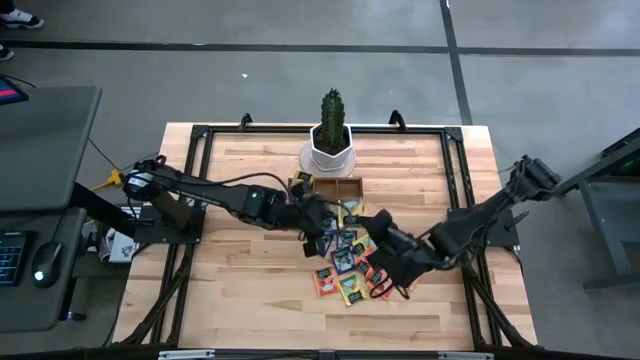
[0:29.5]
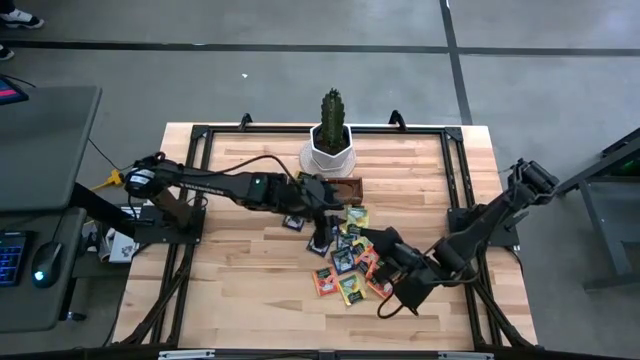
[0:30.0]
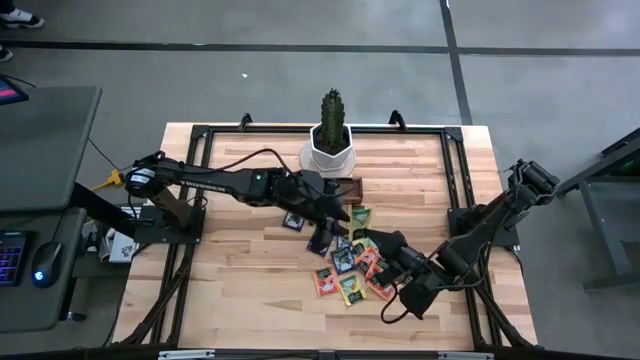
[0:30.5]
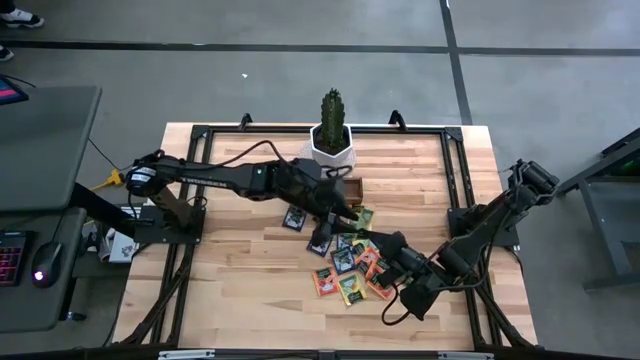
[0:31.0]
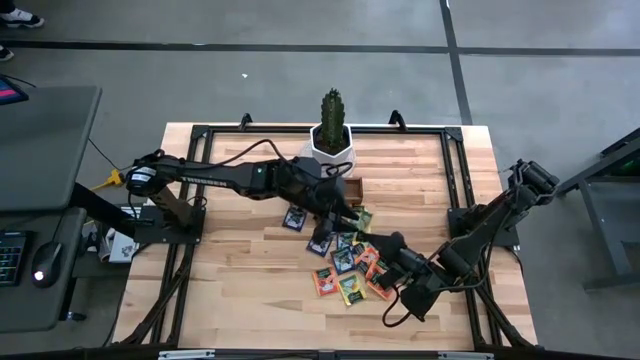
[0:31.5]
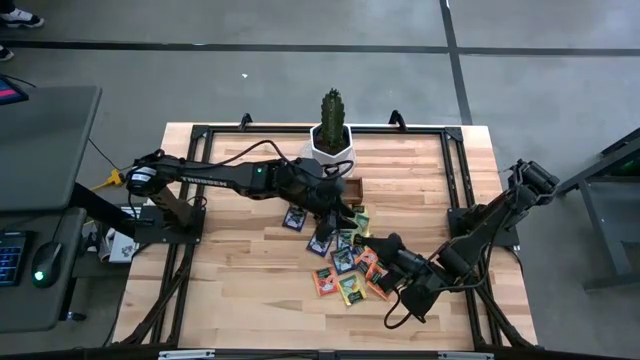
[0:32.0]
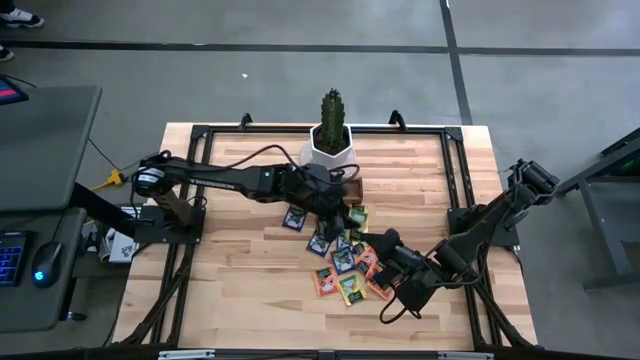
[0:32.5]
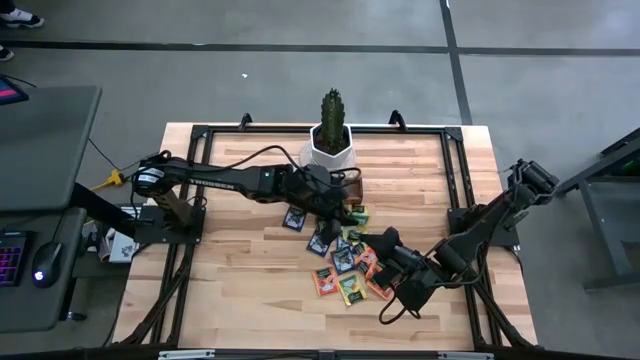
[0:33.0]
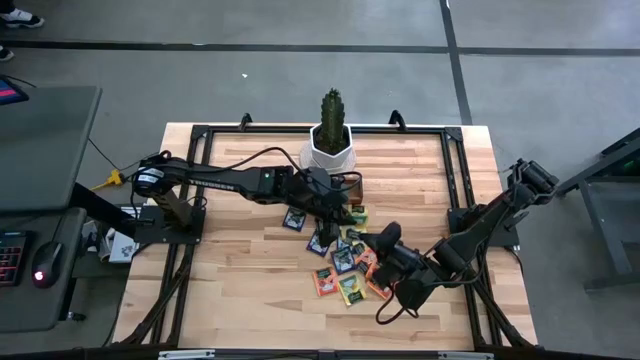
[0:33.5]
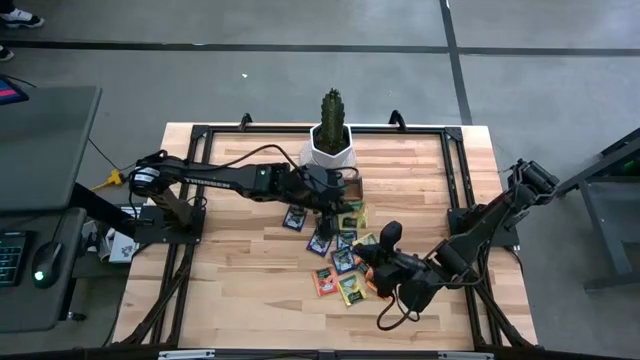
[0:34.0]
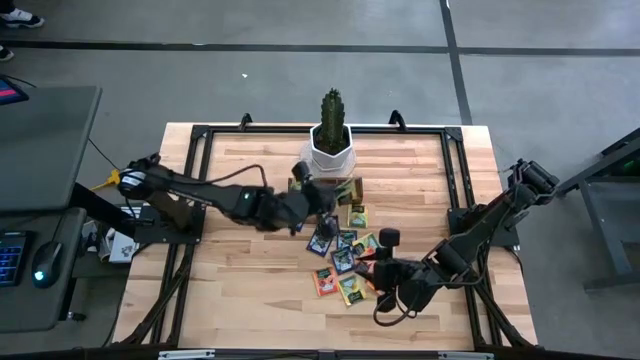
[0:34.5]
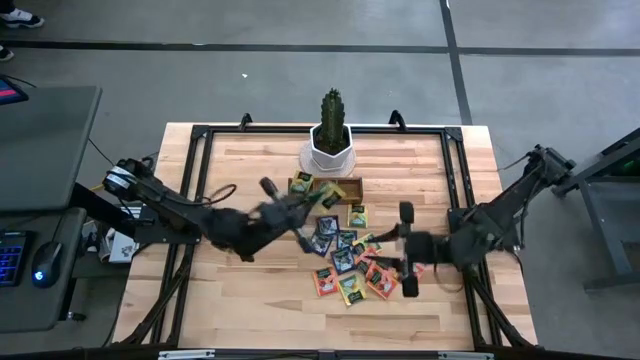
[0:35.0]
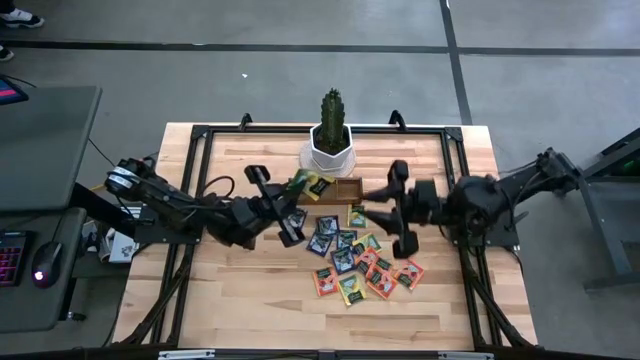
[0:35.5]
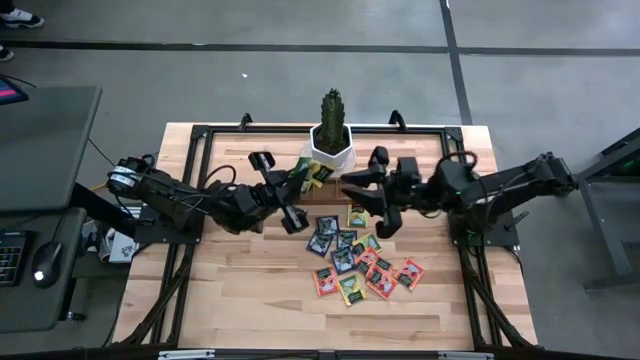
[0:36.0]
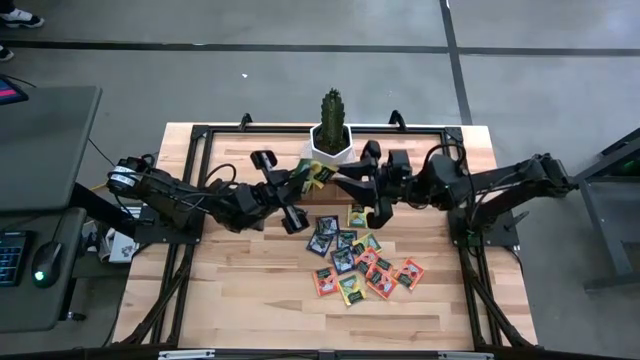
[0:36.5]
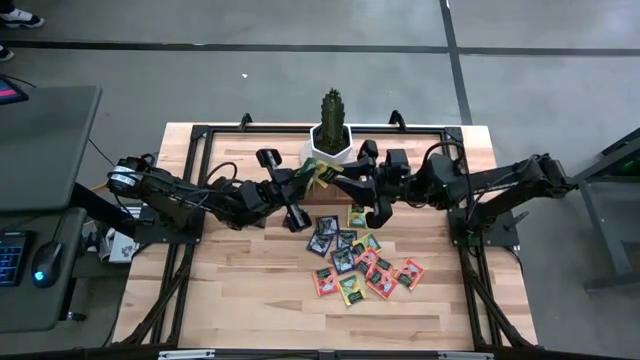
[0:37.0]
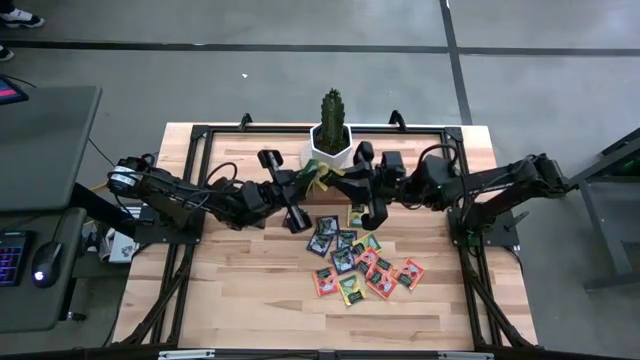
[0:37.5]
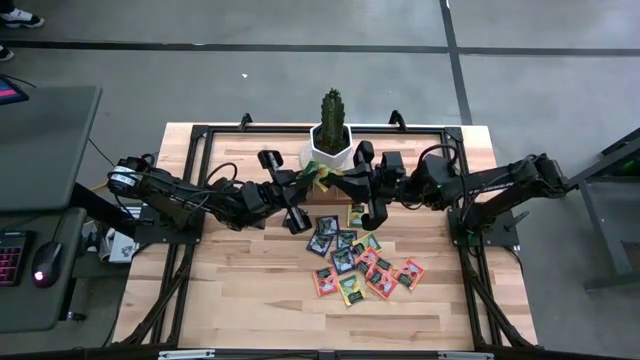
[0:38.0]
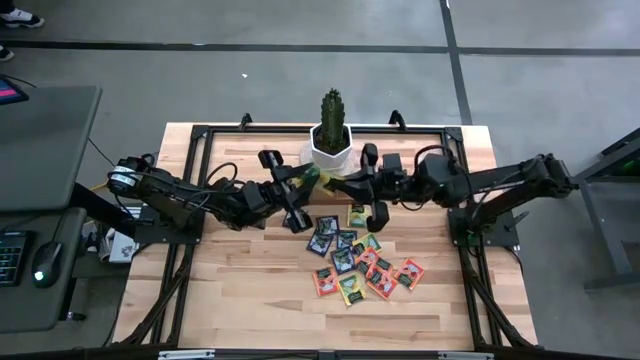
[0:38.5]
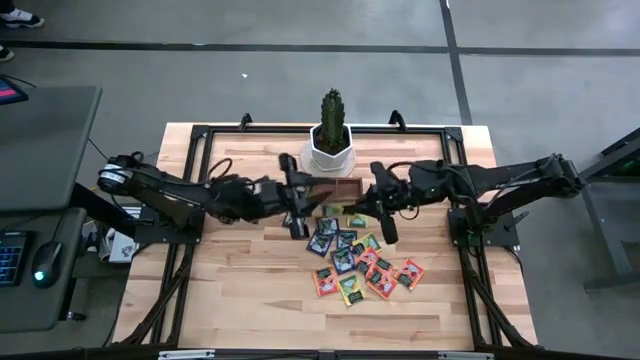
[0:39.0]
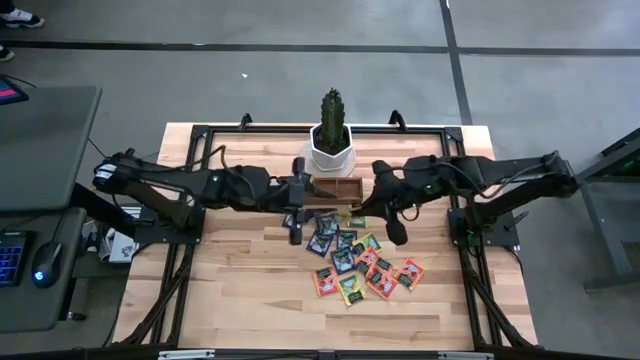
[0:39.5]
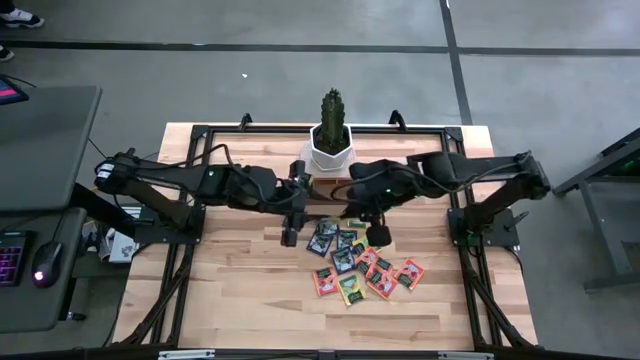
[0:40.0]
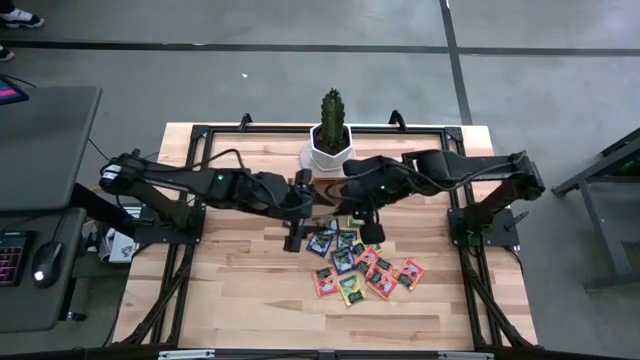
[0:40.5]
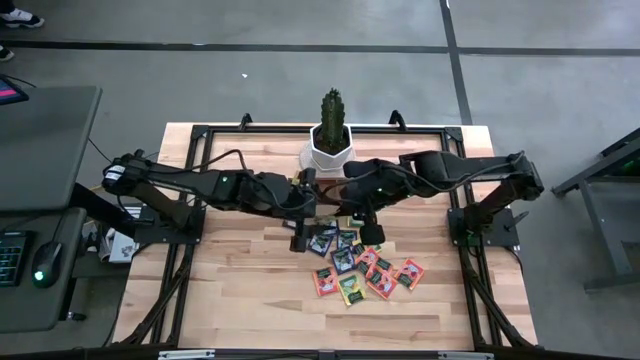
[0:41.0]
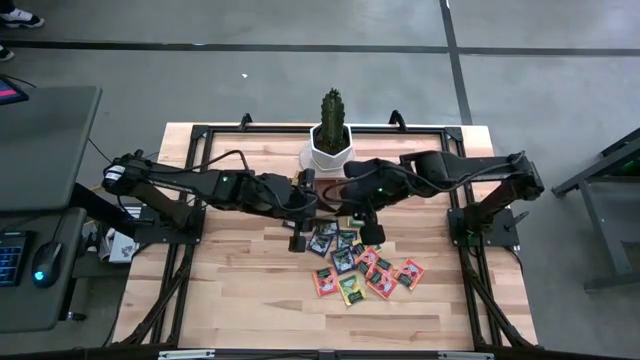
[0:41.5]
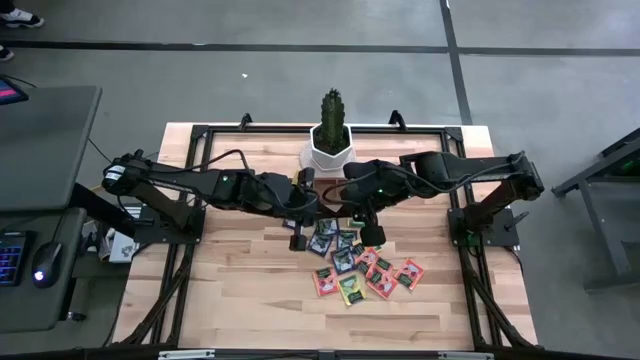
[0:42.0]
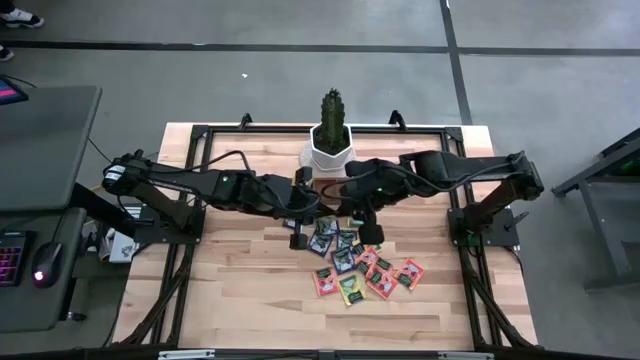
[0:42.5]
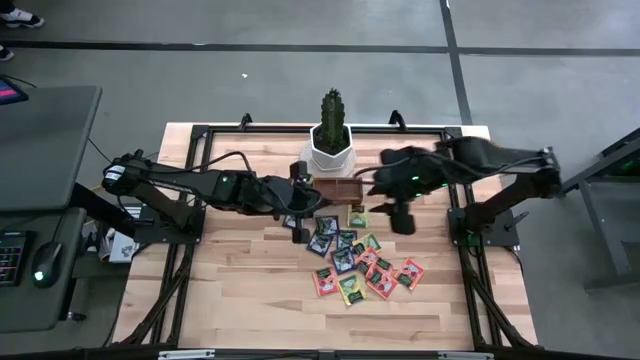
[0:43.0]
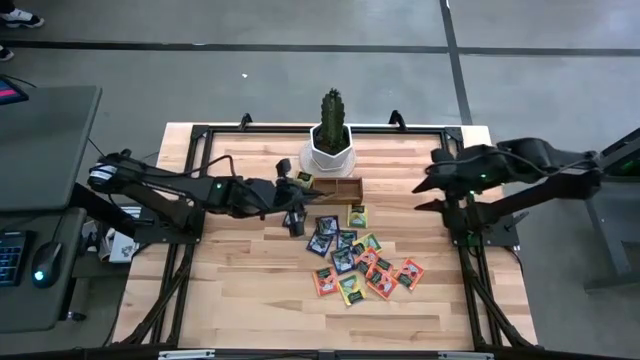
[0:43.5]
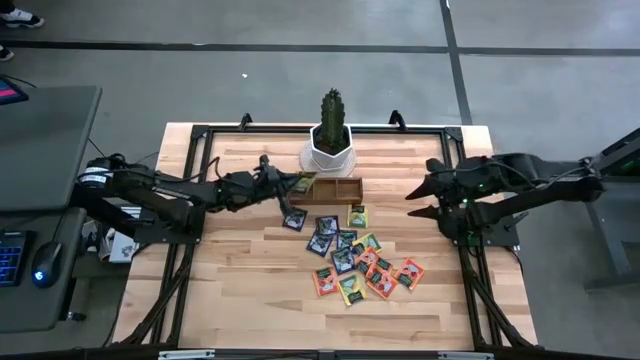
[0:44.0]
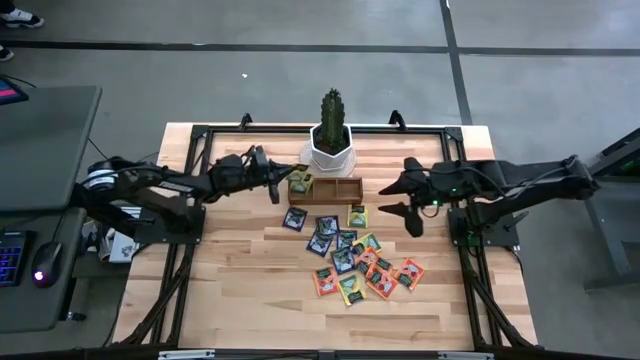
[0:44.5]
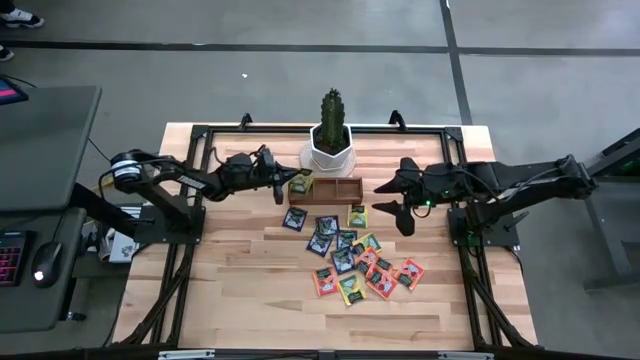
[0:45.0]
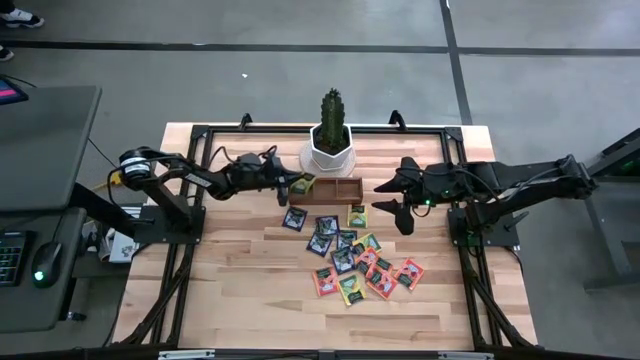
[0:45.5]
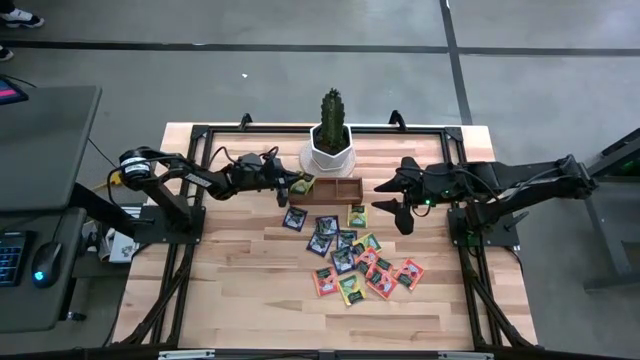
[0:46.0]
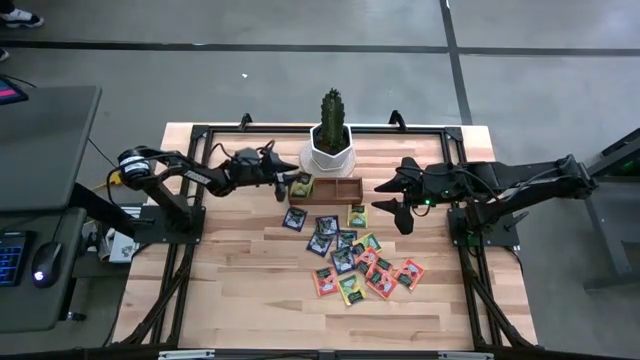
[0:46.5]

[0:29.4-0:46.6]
Task: Pick & Place Tea
Put the yellow tea bag into the left section of the wooden organizer

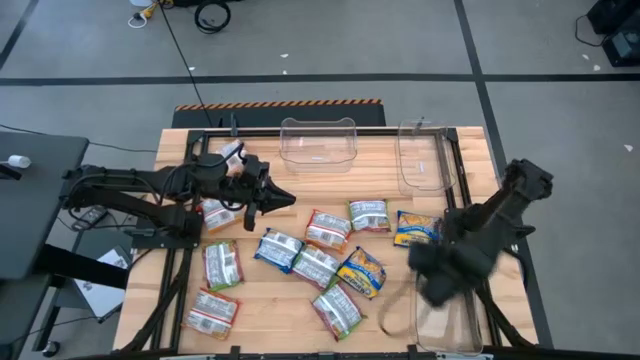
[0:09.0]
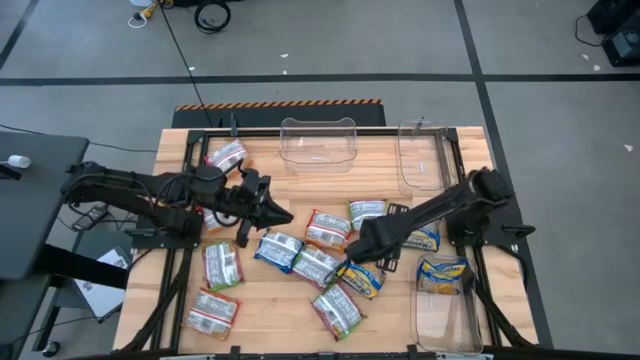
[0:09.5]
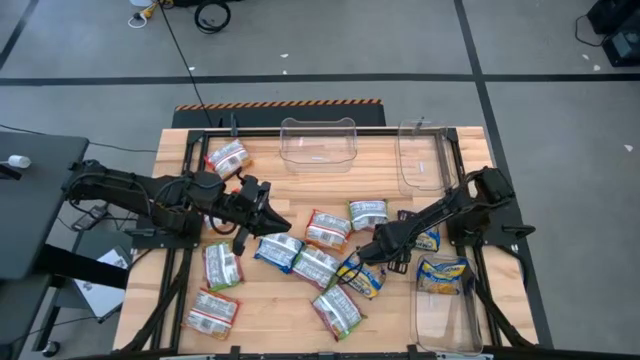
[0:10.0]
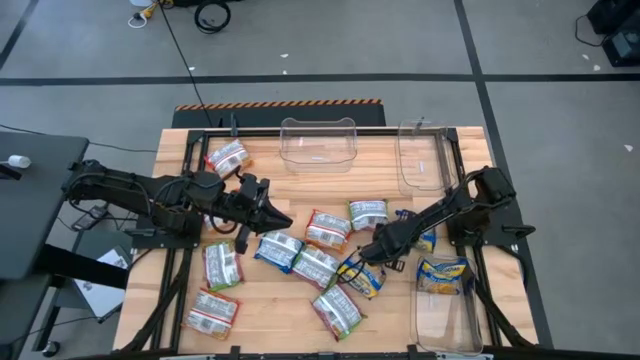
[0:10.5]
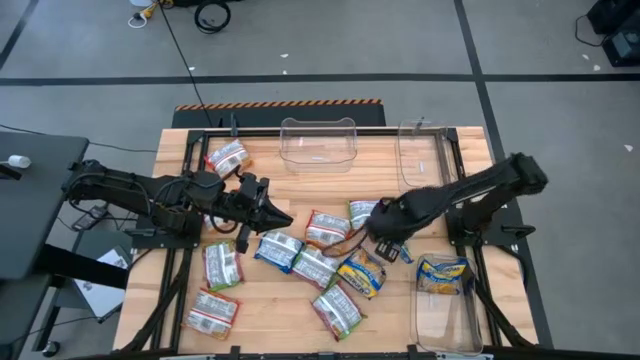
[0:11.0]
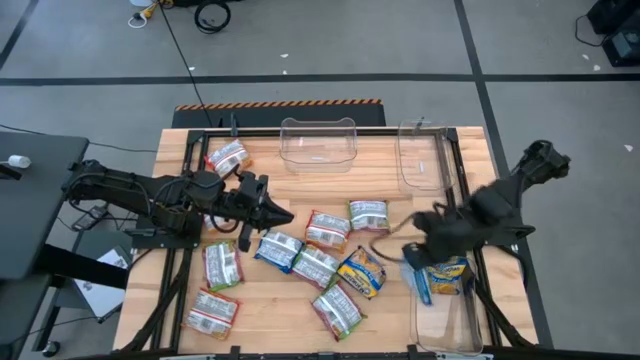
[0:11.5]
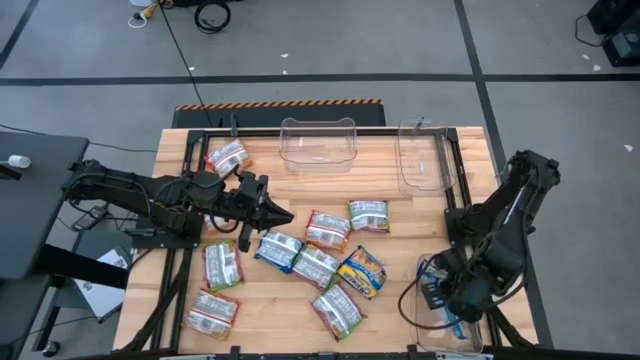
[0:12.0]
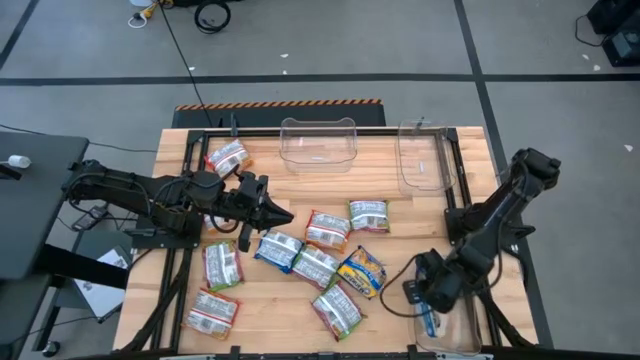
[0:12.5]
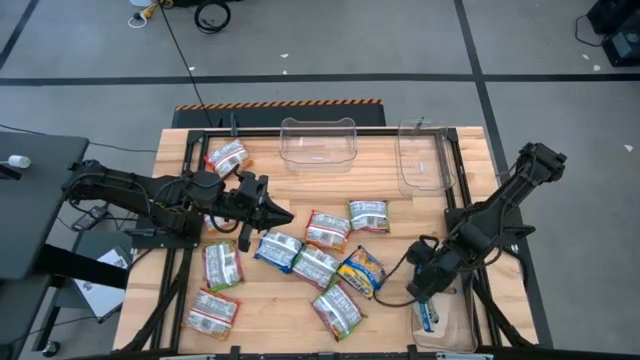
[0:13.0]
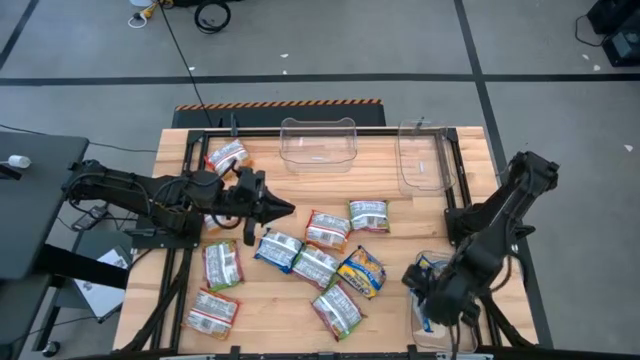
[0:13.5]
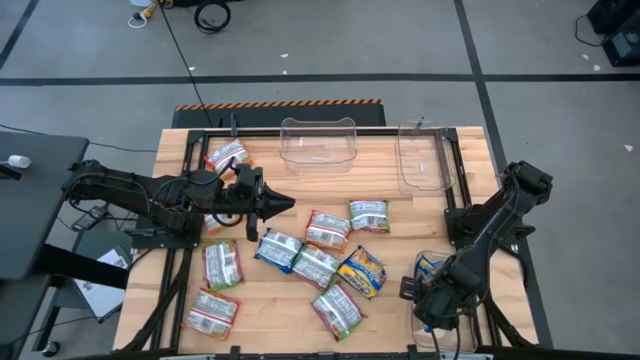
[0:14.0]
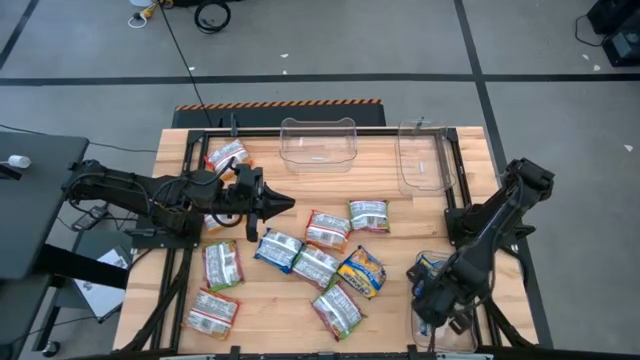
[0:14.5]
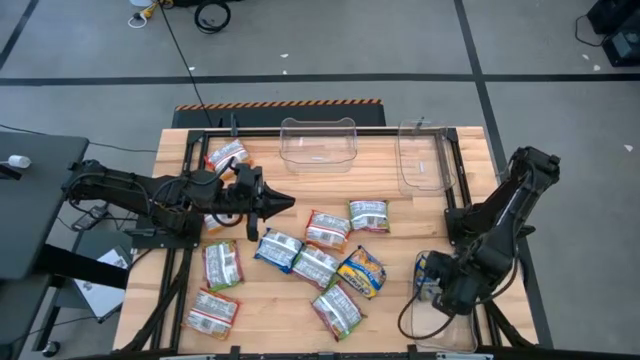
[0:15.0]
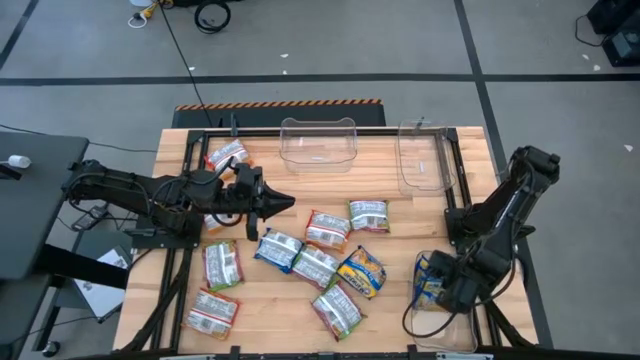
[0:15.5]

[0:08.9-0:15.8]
Task: Sort Maruchan noodles
Put the middle right blue noodle pack into the bottom right transparent bin
